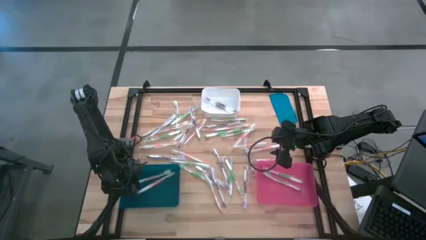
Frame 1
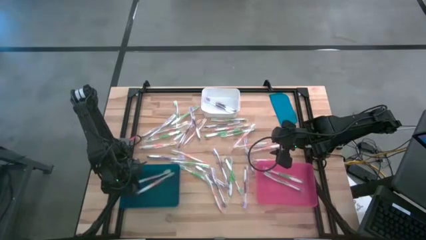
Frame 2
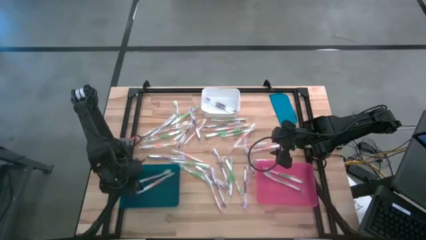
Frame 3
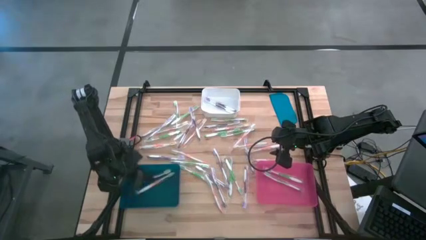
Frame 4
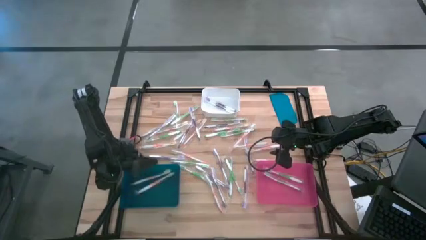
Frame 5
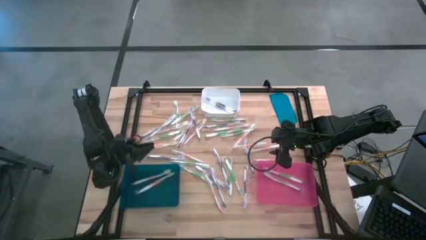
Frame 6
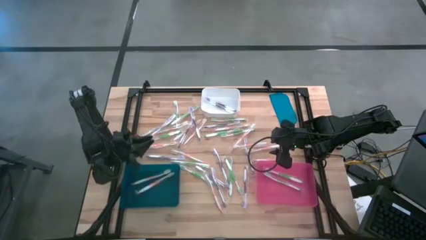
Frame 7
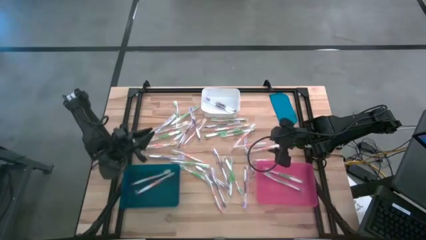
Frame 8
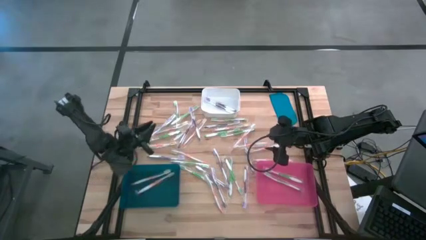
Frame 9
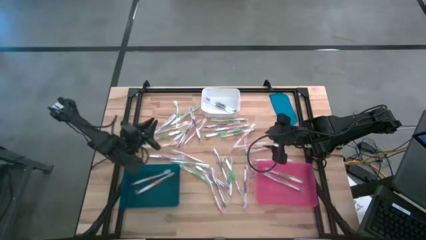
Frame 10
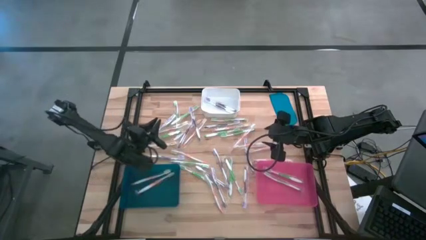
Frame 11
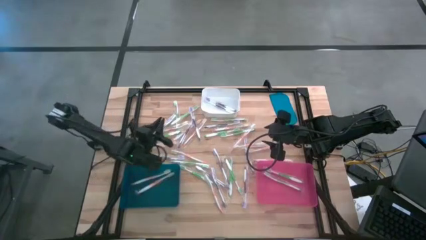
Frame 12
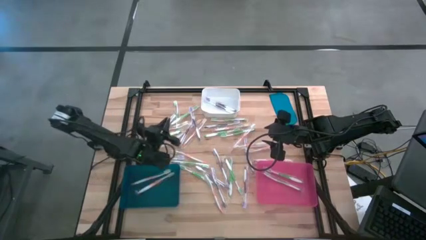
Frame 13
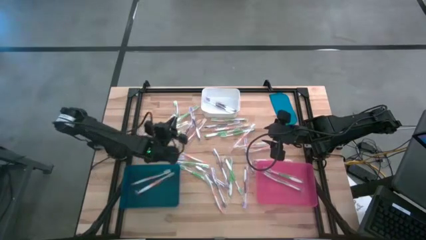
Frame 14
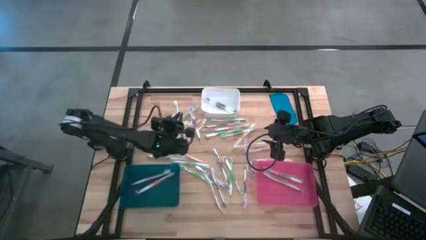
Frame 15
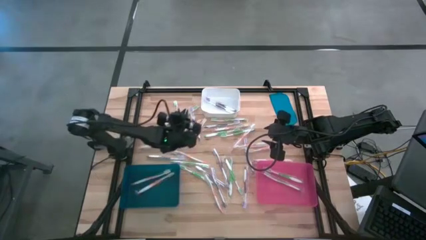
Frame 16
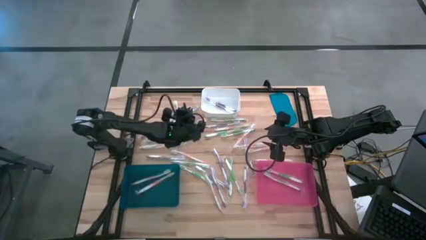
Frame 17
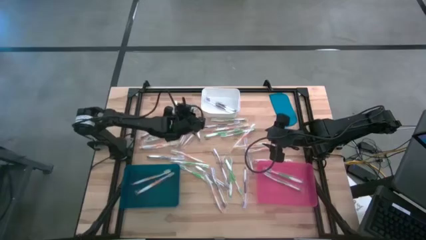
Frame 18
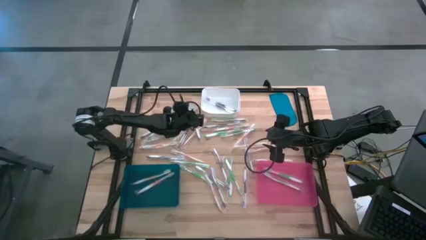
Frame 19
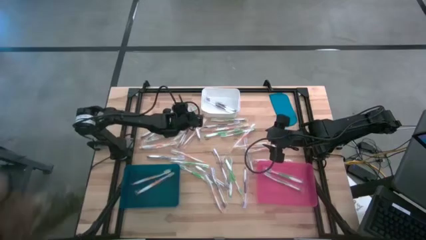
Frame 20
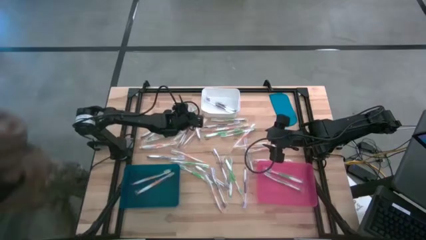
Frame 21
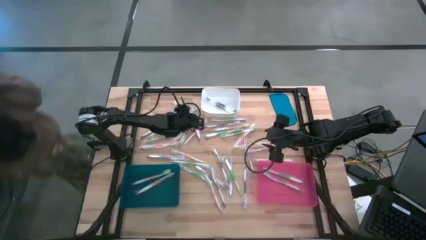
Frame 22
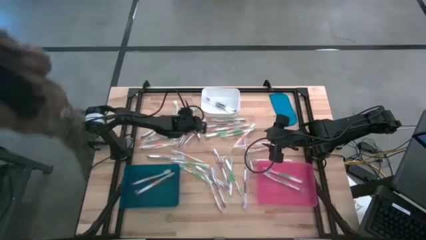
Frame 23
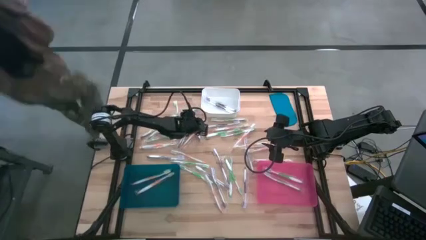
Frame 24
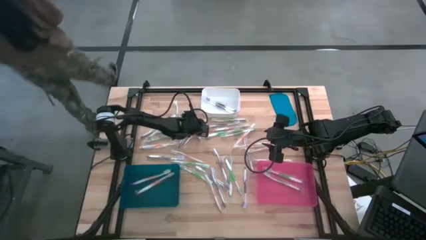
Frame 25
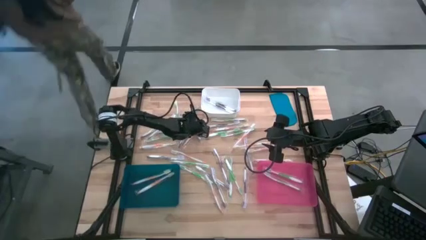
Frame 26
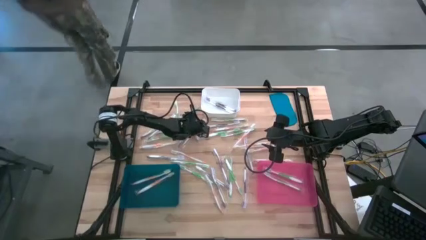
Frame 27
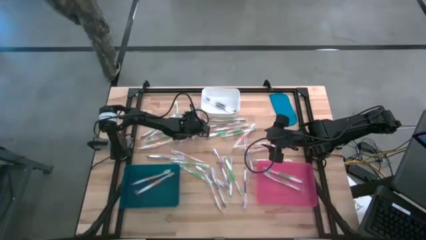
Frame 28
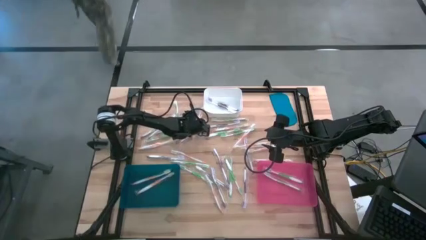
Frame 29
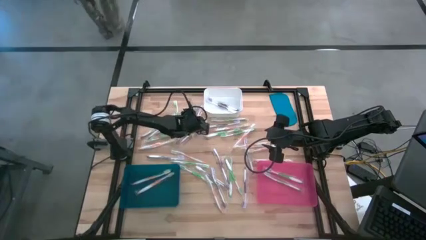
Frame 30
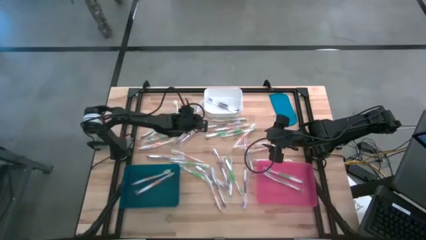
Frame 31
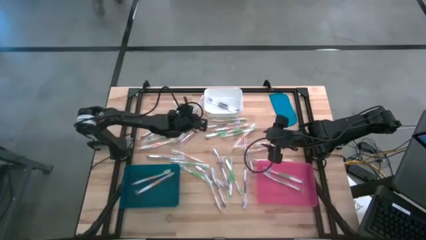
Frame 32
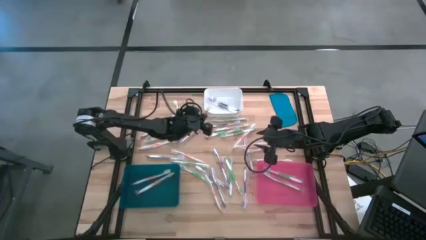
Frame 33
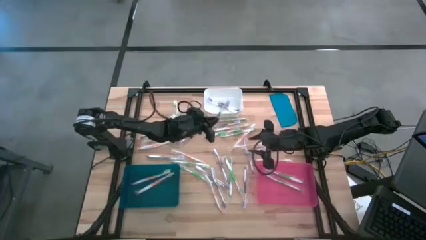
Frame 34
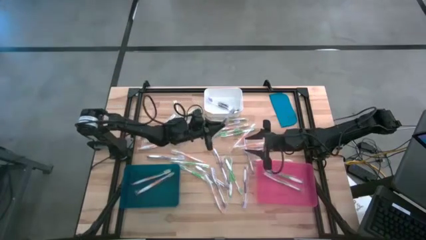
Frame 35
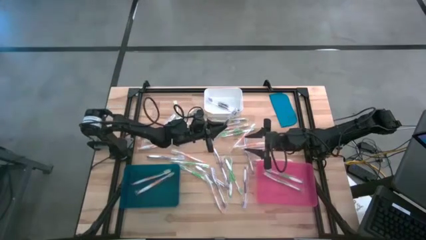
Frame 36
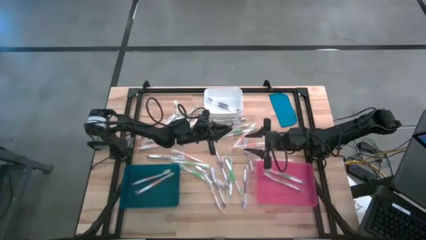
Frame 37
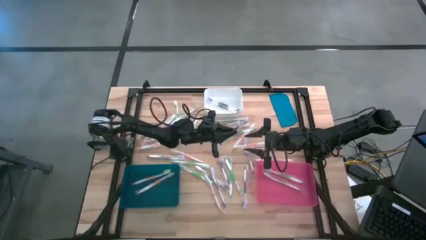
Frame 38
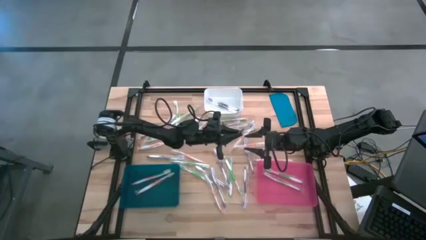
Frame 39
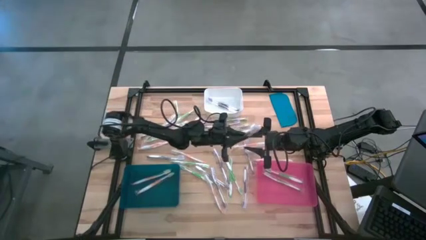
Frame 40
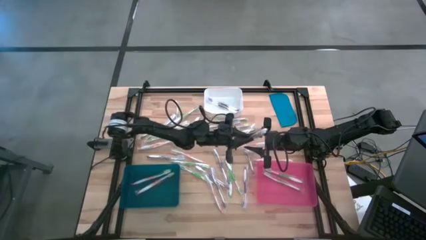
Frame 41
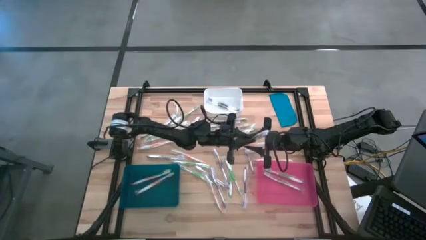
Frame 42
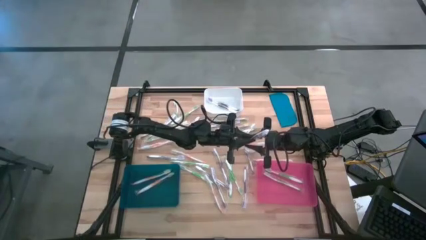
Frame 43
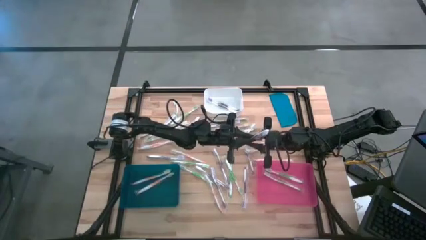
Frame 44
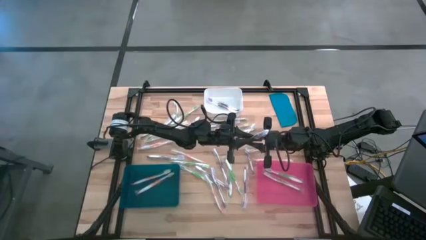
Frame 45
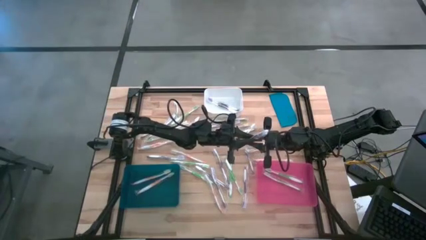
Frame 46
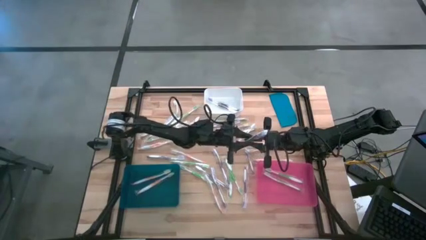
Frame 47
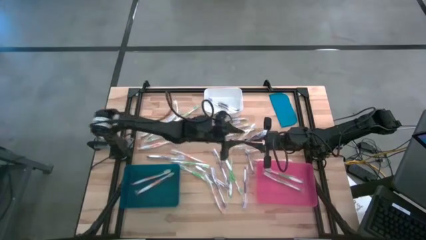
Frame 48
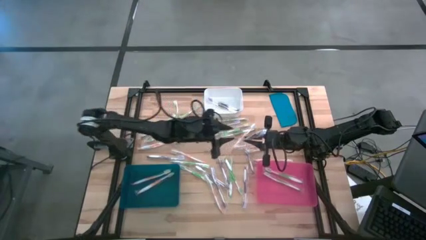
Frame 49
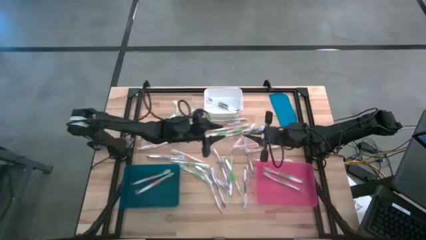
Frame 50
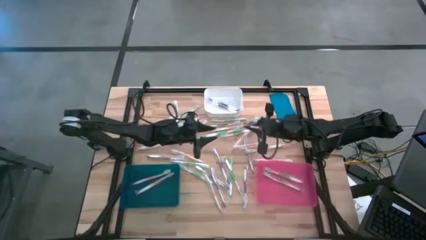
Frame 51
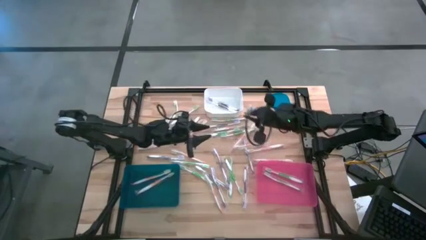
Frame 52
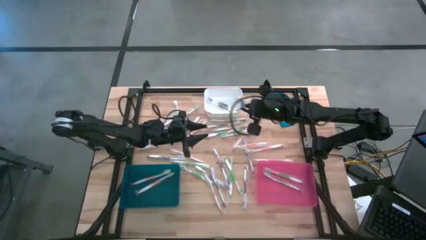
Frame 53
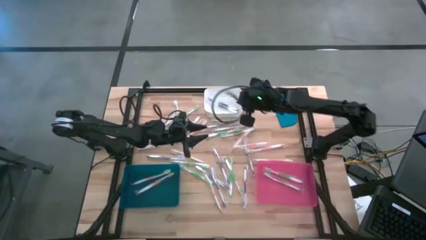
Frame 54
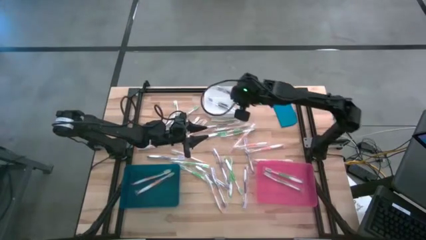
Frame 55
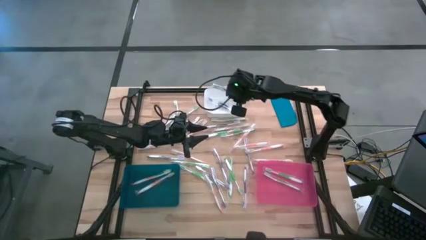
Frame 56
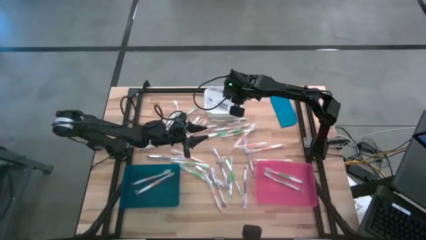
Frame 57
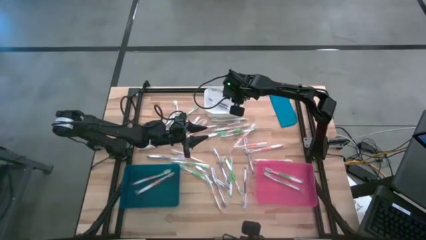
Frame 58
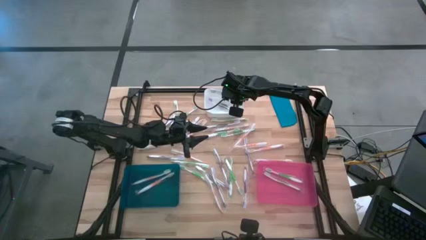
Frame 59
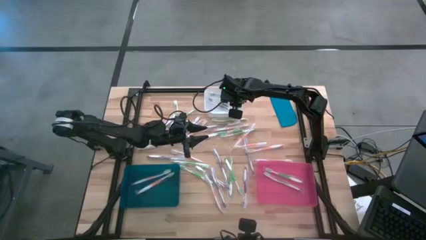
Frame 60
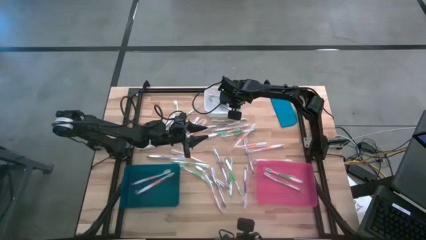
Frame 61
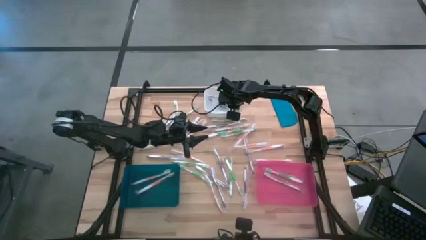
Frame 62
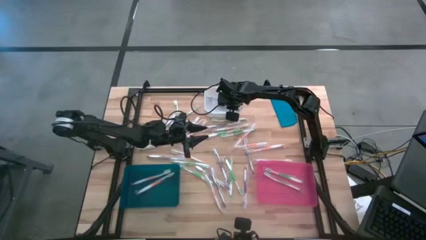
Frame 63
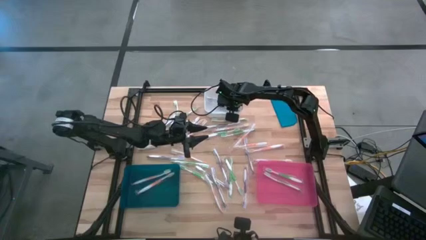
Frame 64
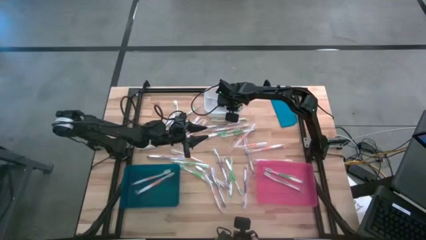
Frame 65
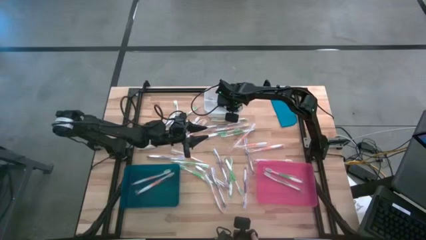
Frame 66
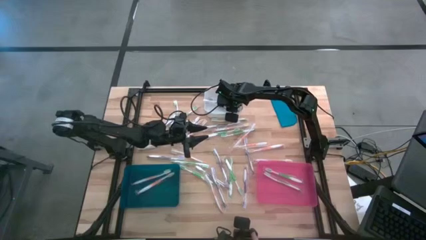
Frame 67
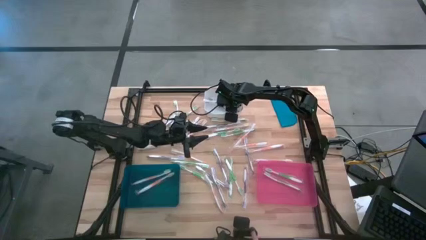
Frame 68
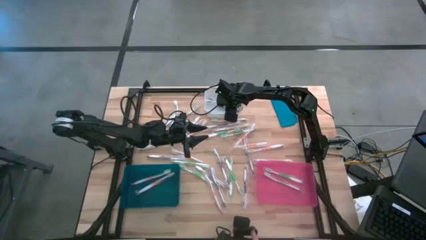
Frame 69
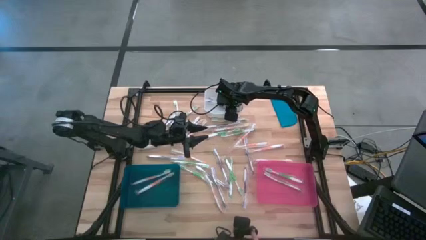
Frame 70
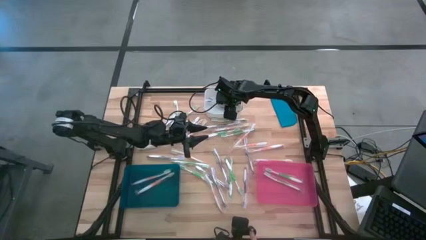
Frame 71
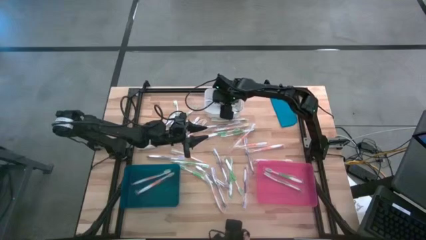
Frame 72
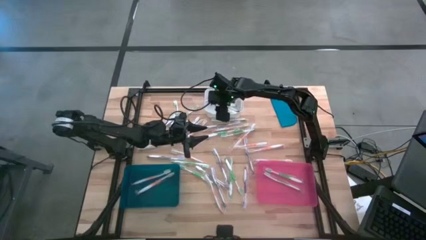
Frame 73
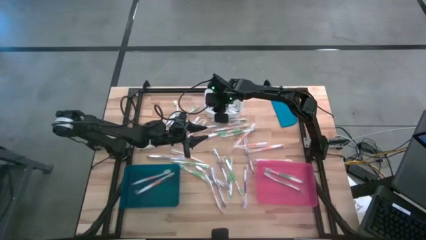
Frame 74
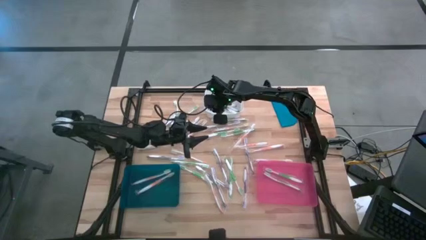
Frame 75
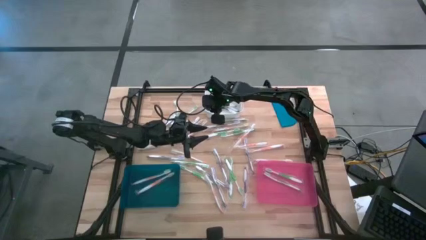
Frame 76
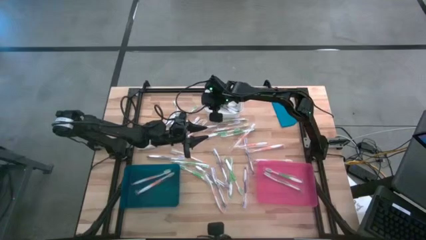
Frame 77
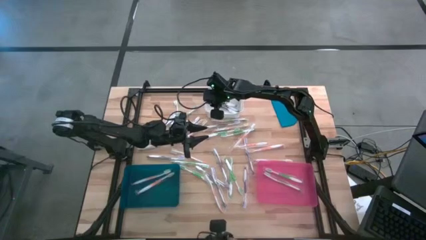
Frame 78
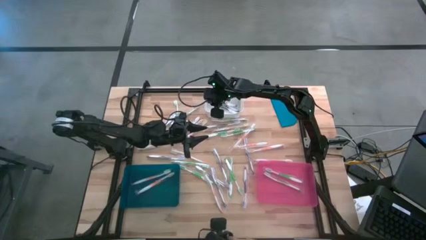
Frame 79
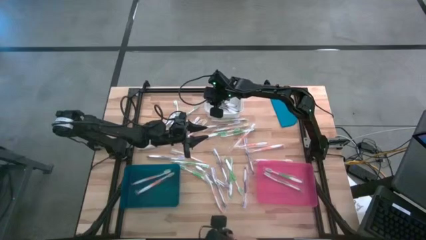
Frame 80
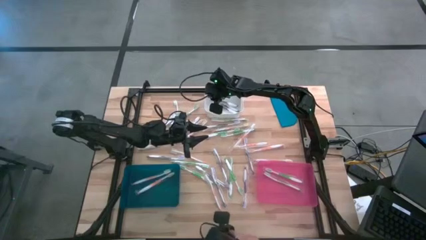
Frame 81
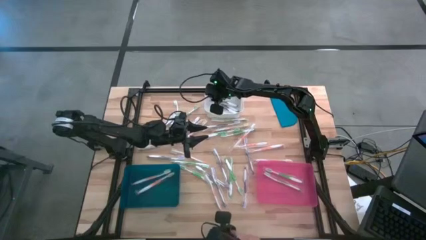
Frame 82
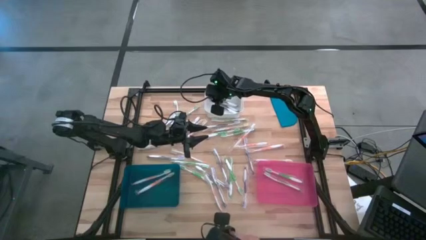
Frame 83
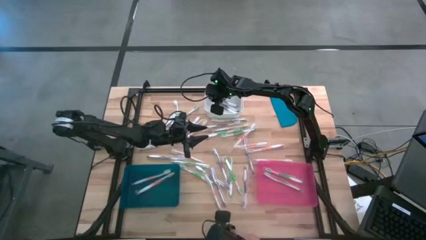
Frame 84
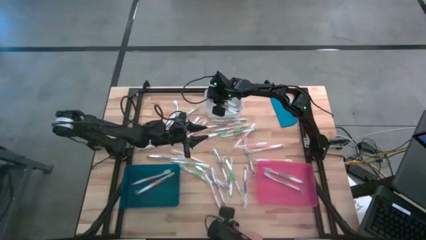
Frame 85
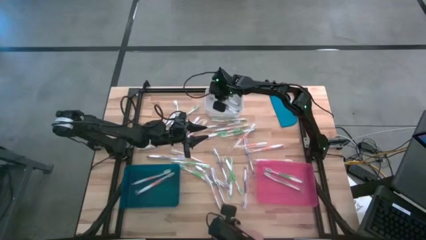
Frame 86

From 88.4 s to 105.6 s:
Task: Pick & Place Toothbrushes
Put the violet toothbrush into the white bin
